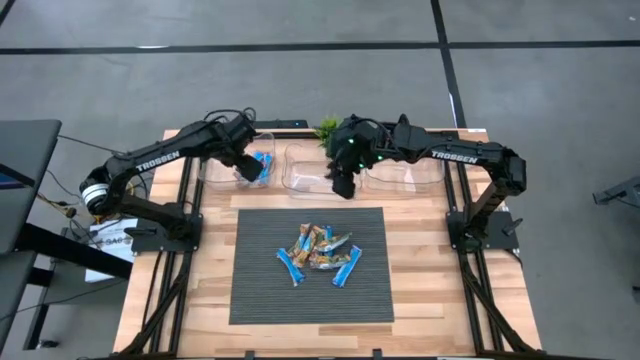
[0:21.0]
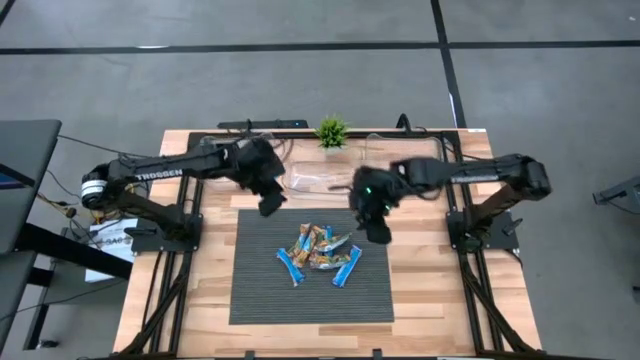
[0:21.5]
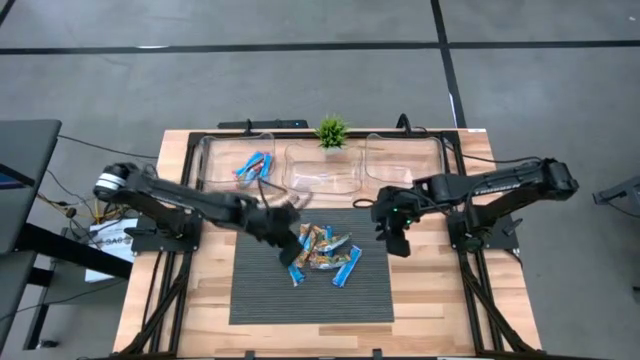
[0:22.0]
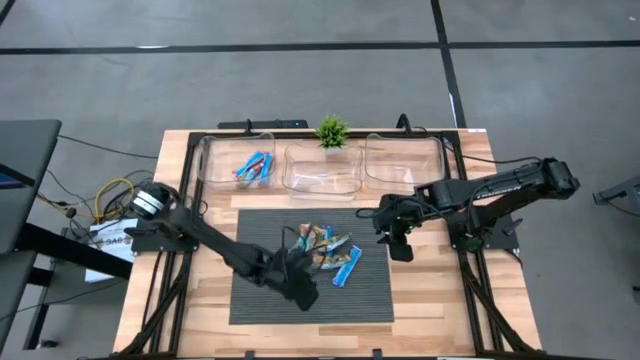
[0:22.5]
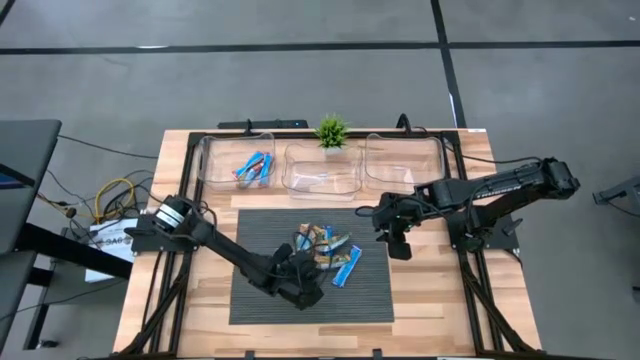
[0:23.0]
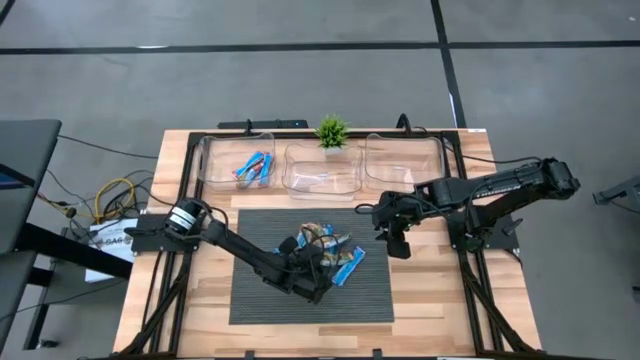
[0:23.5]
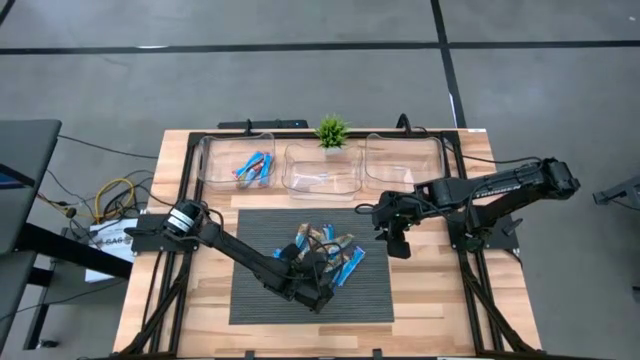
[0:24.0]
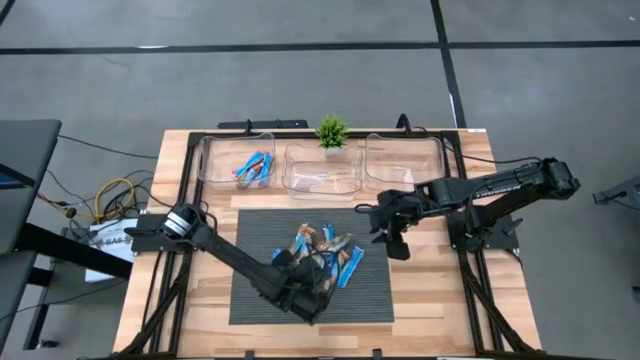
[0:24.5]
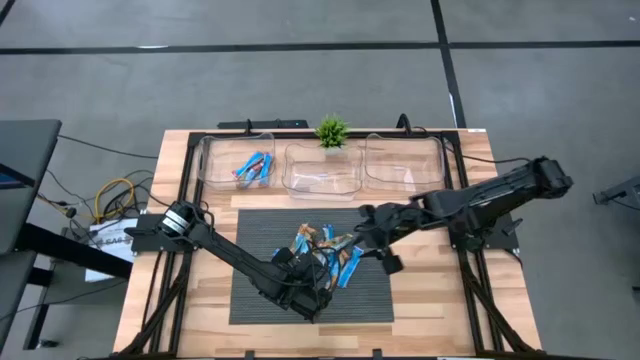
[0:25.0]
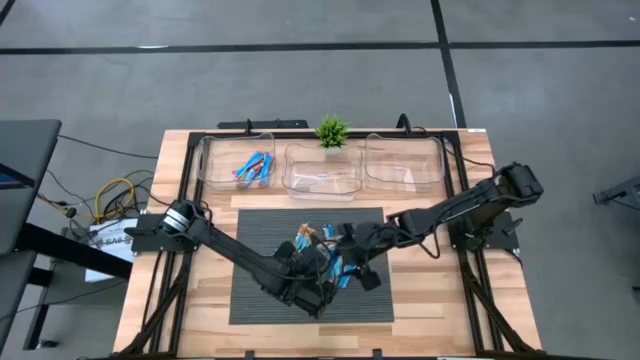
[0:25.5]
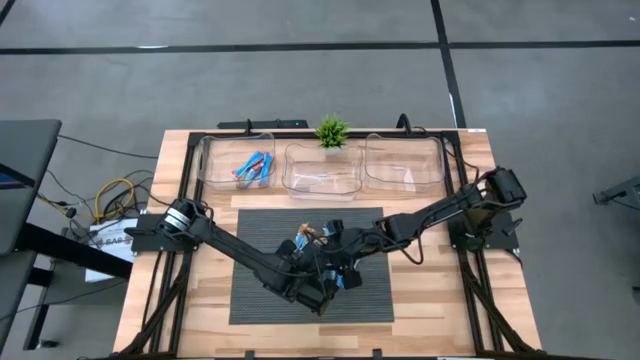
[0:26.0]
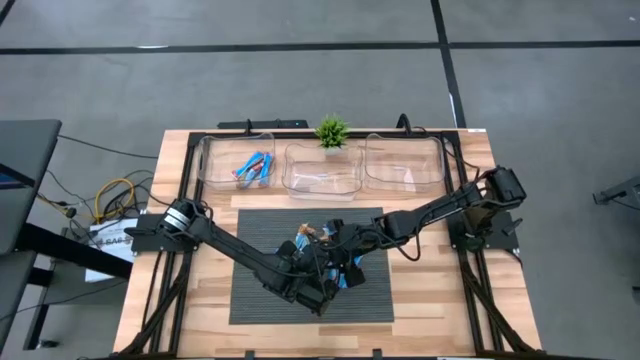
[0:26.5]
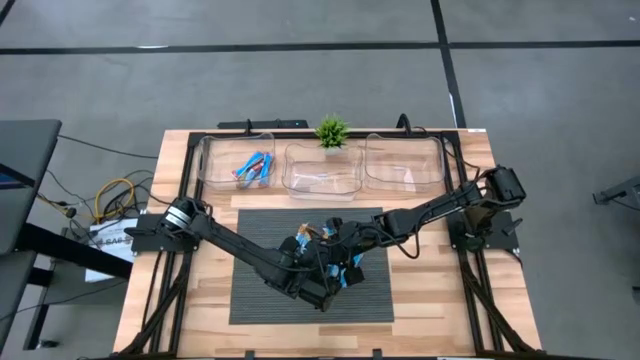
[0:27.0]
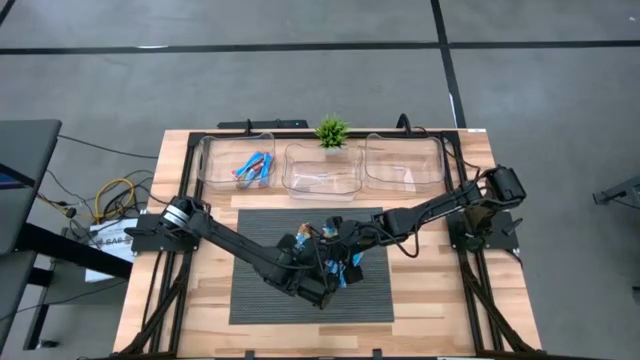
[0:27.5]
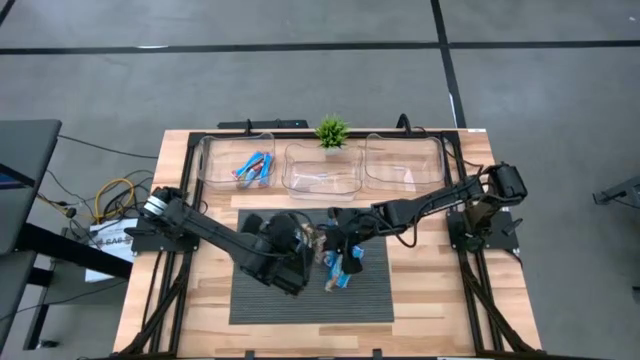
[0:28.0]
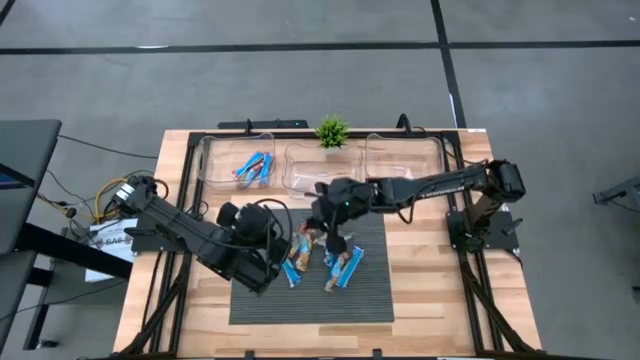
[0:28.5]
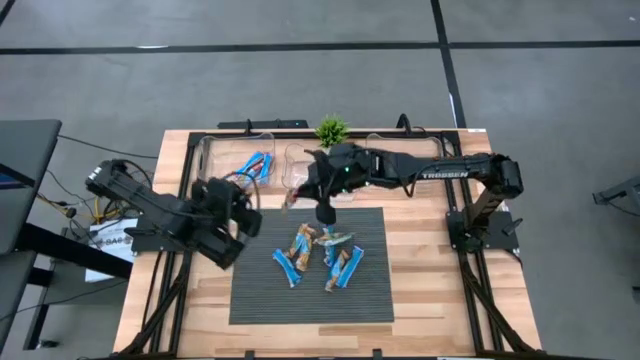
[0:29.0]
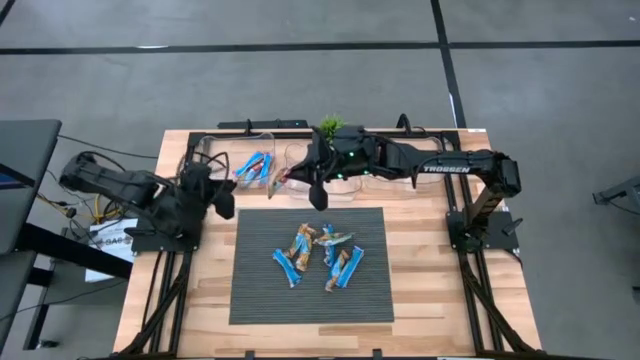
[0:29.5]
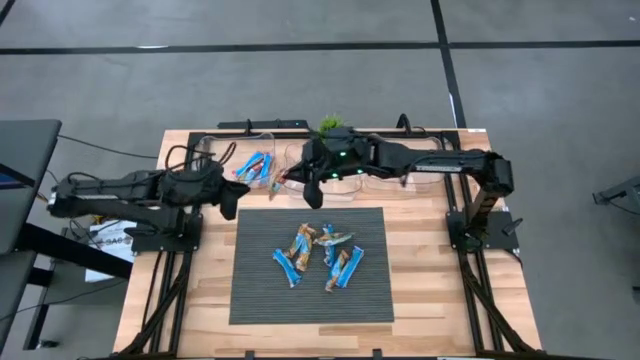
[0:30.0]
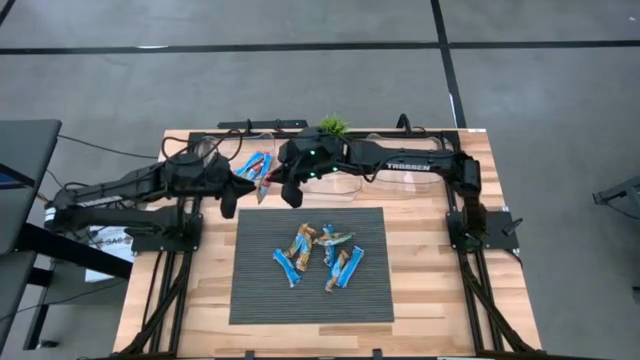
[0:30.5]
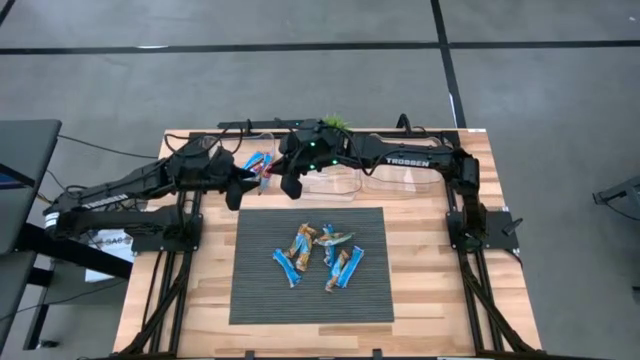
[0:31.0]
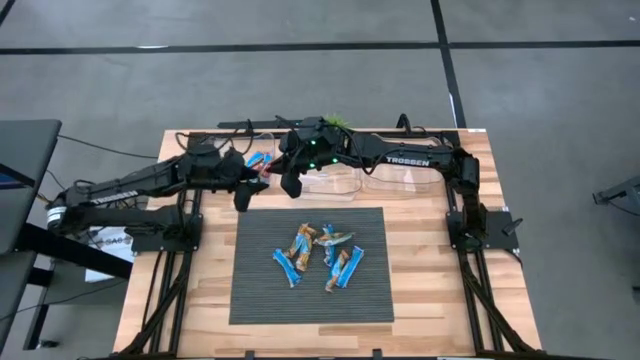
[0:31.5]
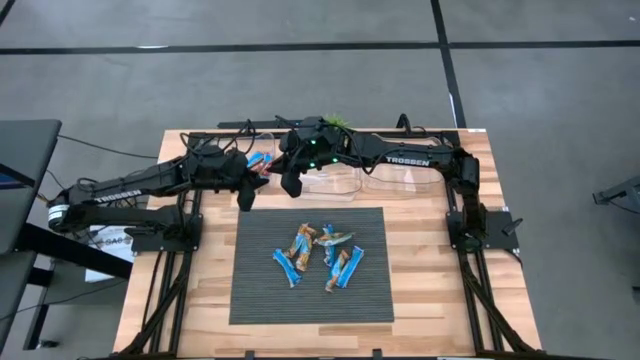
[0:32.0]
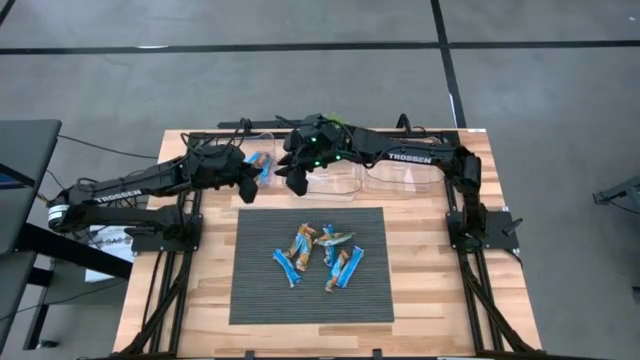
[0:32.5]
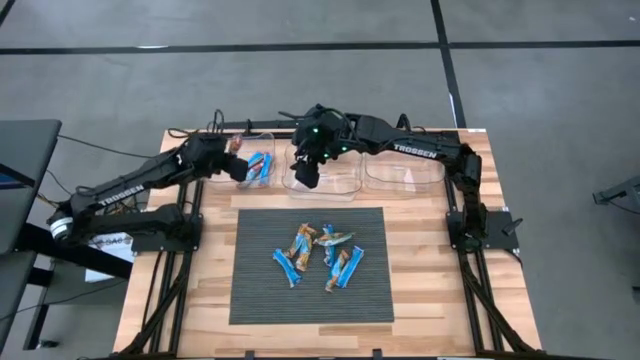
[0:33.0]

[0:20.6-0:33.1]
Task: Pick and place Granola Bars by type
Put the red granola bar into the top left transparent bin

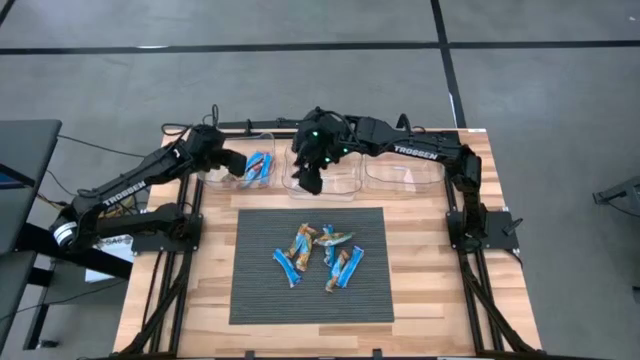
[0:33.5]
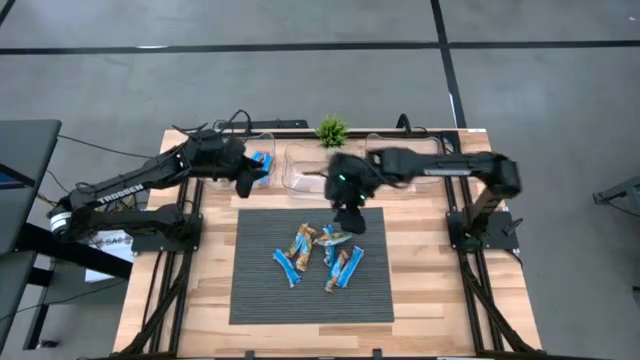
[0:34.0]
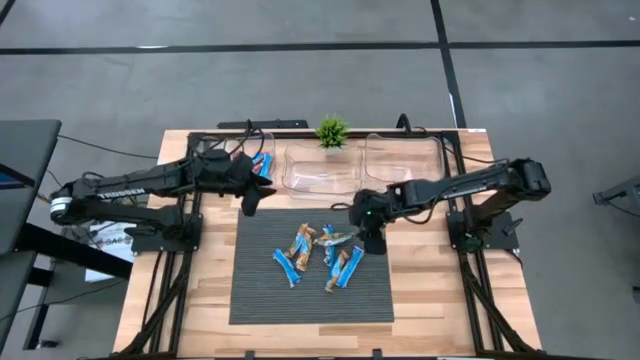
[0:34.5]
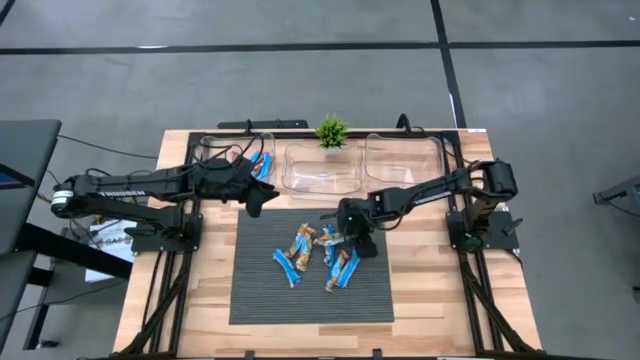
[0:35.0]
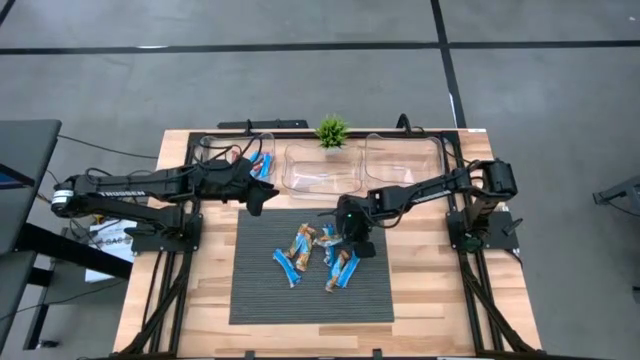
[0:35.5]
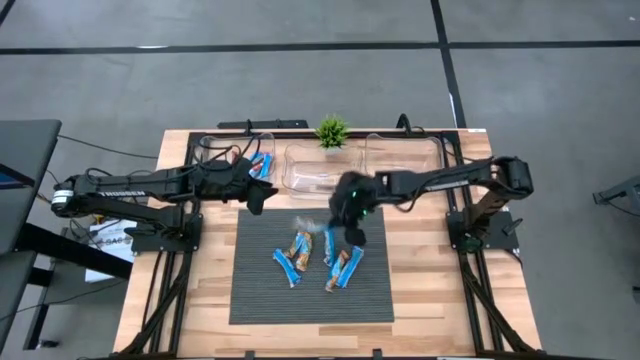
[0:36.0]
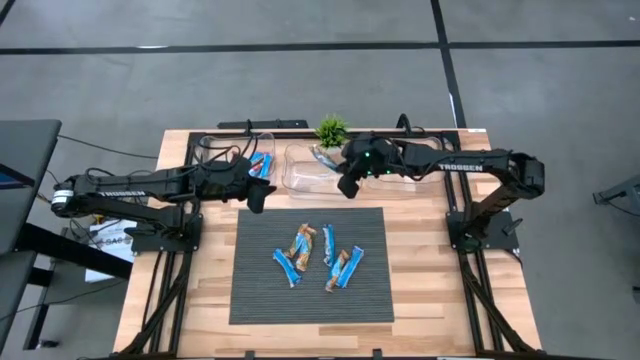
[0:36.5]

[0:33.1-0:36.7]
Put the green granola bar into the top center transparent bin

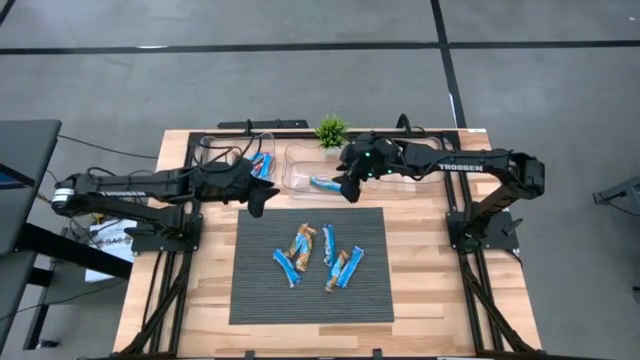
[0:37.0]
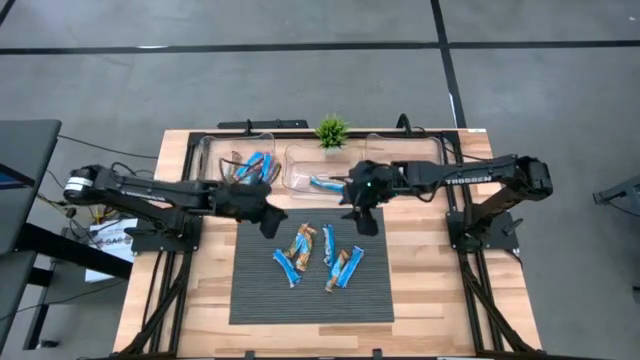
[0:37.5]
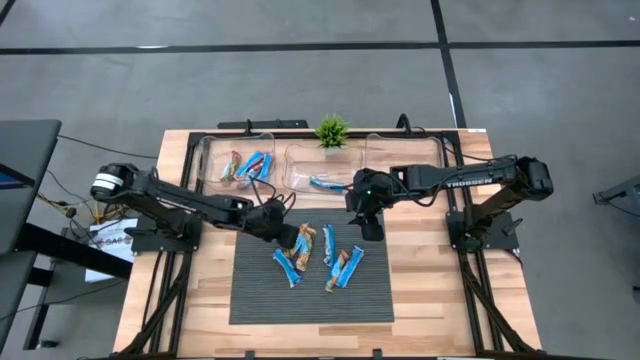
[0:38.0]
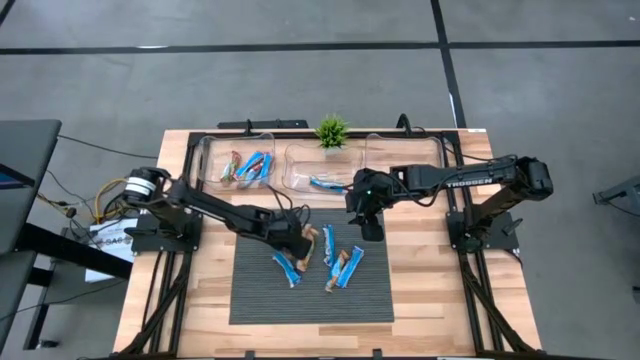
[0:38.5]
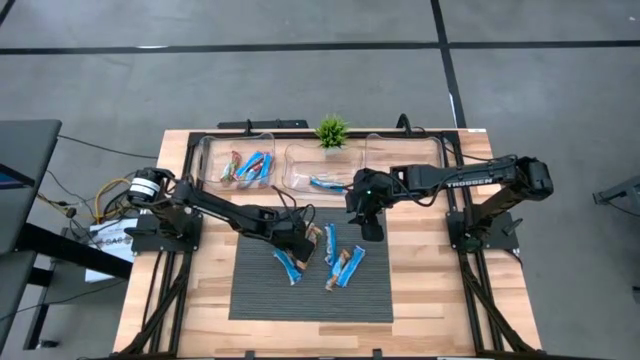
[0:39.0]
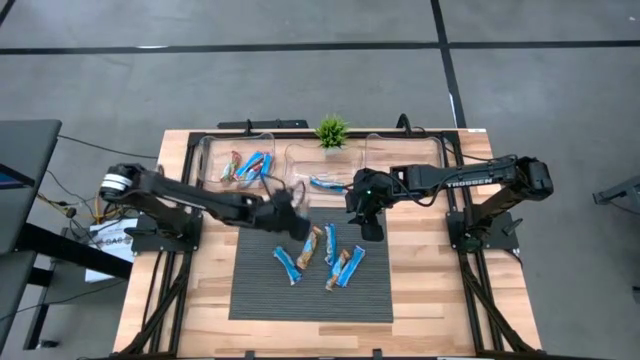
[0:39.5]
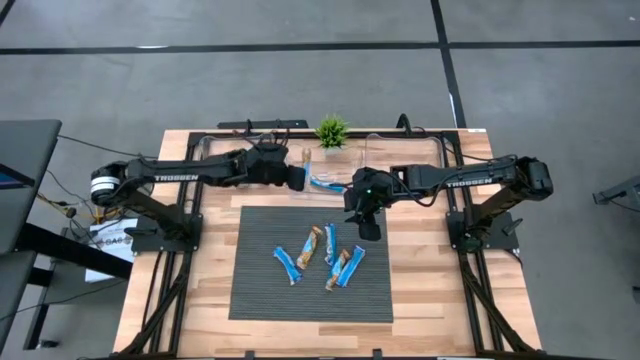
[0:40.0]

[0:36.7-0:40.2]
Put the green granola bar into the top center transparent bin

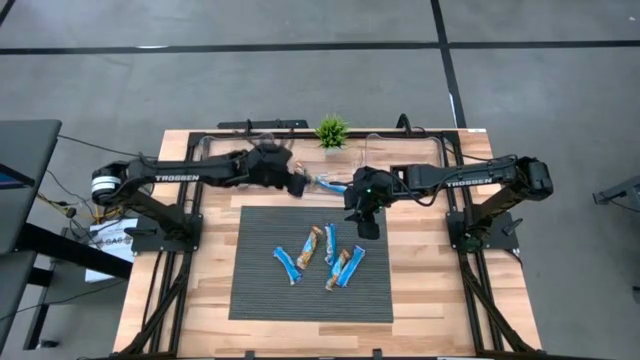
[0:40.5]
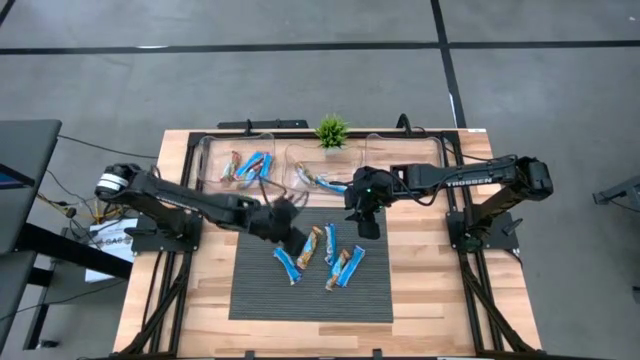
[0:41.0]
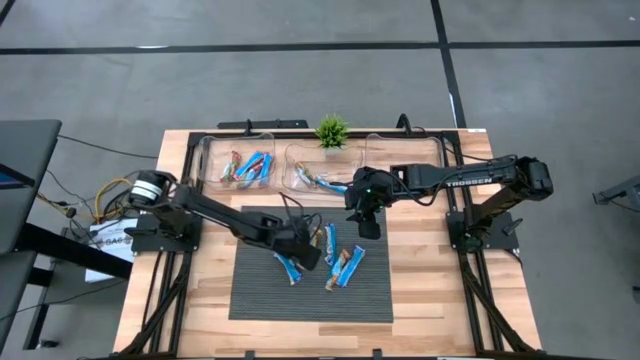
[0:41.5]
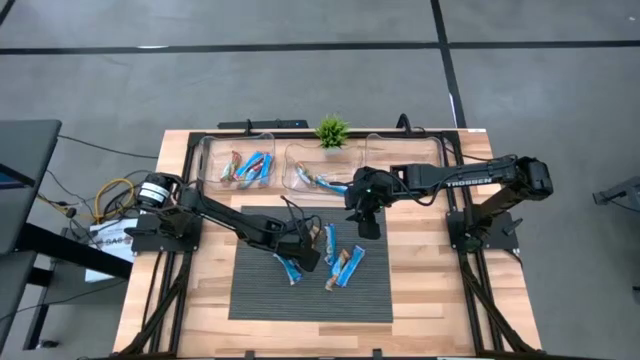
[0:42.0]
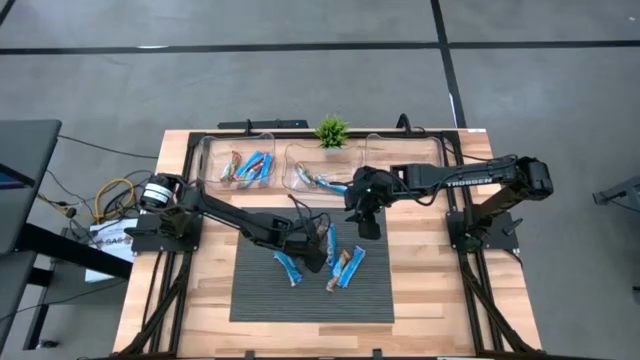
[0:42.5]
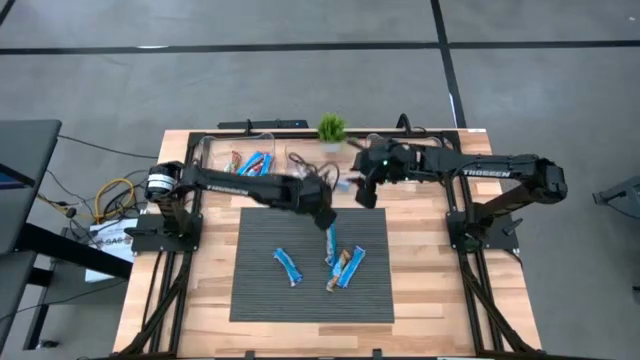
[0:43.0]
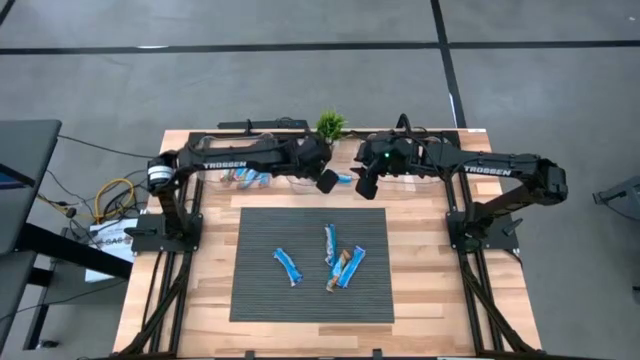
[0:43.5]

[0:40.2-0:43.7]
Put the green granola bar into the top center transparent bin
